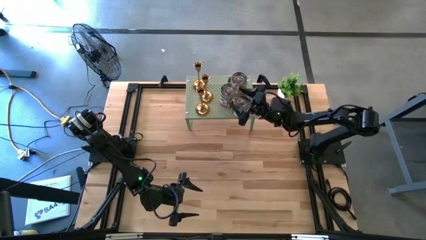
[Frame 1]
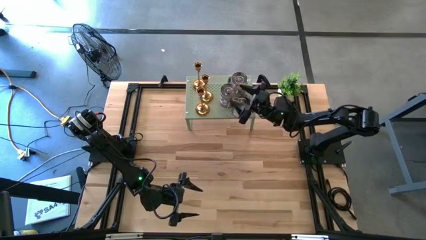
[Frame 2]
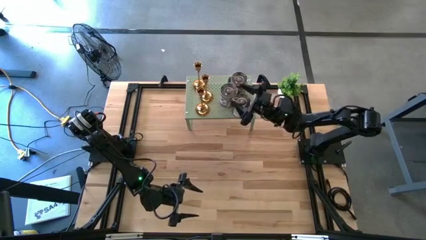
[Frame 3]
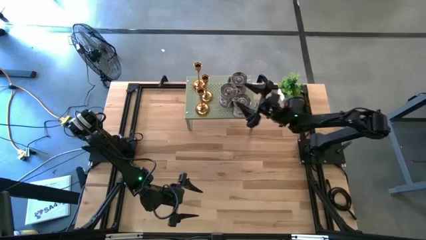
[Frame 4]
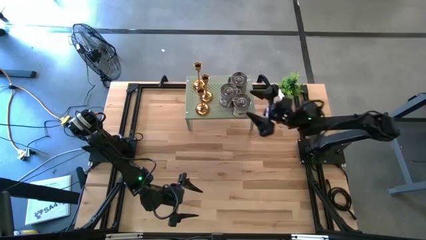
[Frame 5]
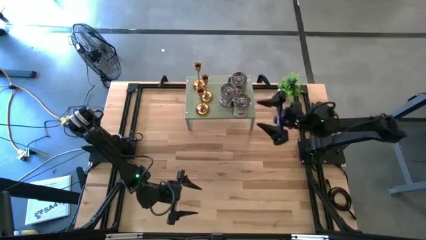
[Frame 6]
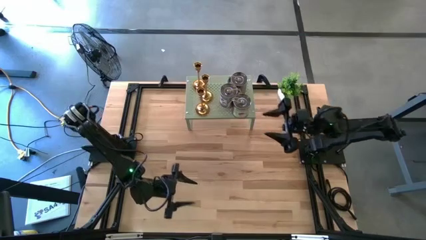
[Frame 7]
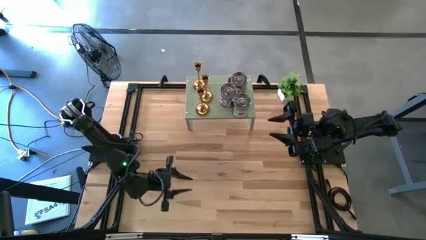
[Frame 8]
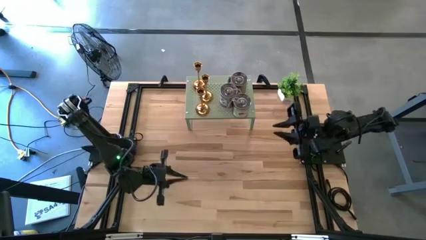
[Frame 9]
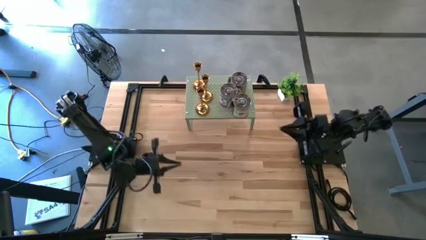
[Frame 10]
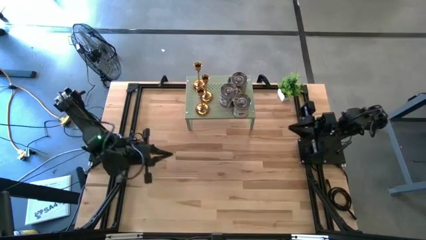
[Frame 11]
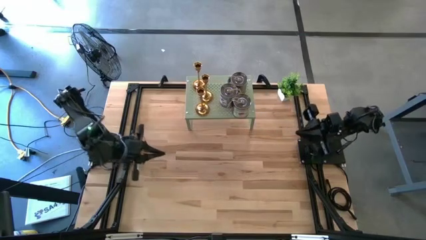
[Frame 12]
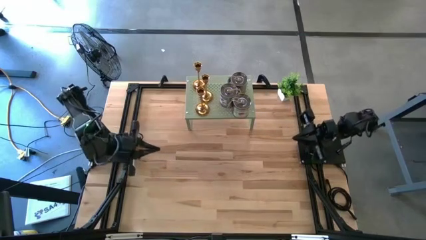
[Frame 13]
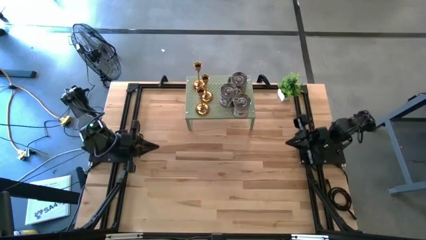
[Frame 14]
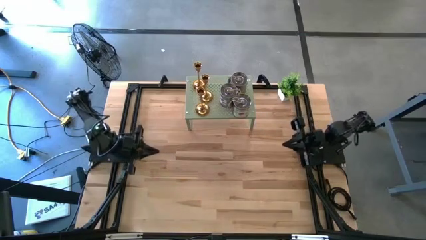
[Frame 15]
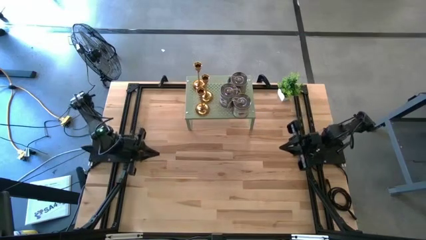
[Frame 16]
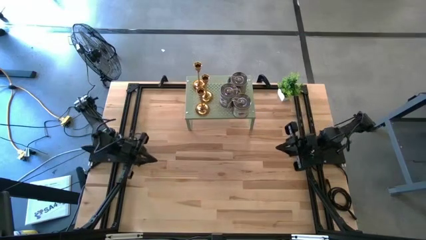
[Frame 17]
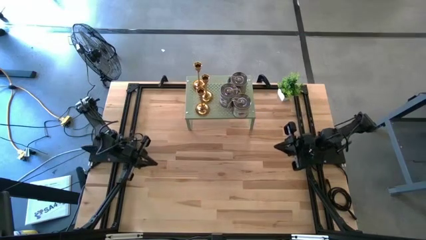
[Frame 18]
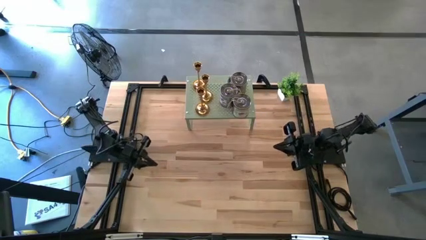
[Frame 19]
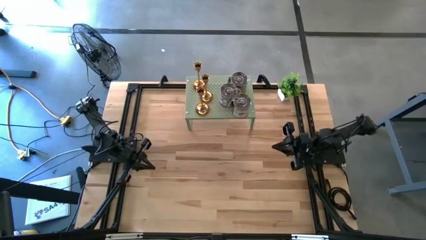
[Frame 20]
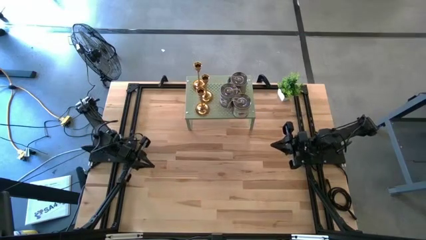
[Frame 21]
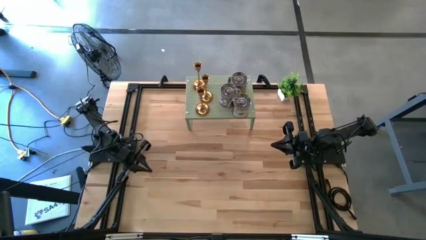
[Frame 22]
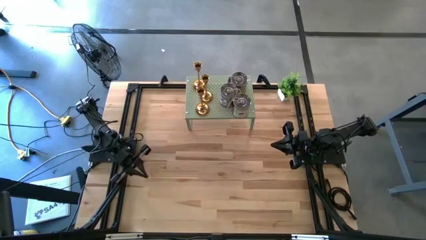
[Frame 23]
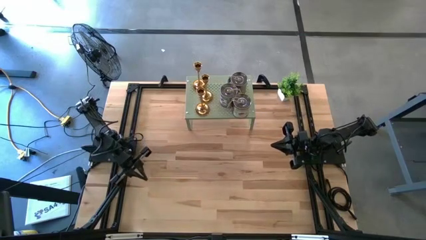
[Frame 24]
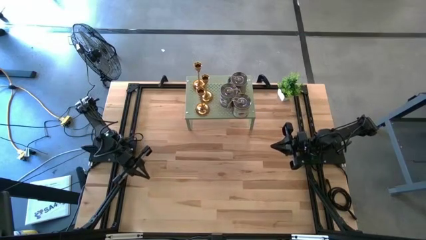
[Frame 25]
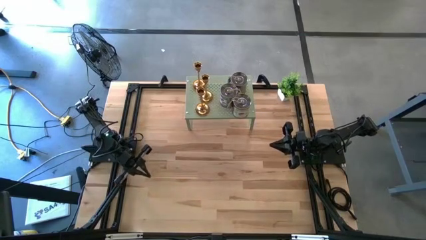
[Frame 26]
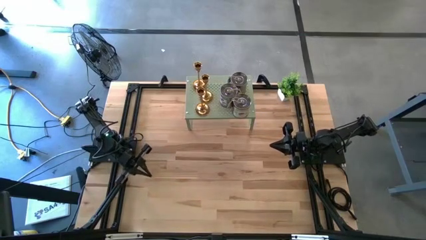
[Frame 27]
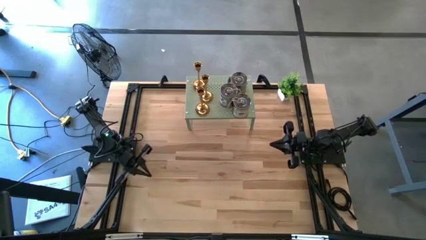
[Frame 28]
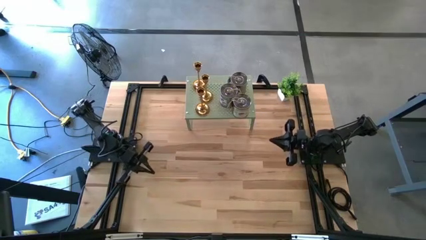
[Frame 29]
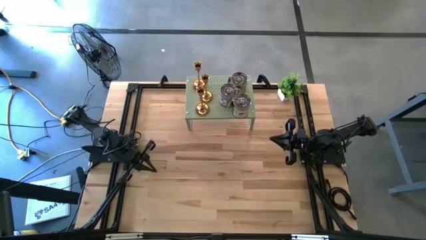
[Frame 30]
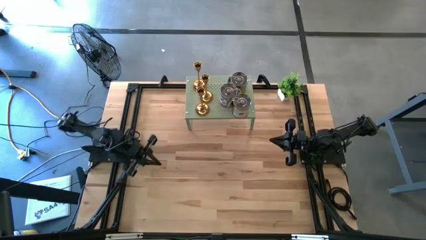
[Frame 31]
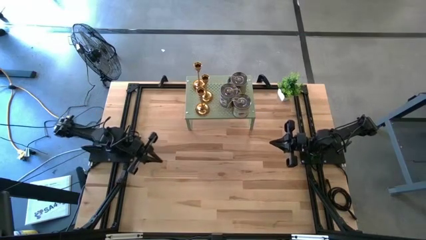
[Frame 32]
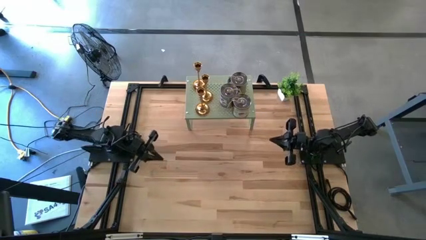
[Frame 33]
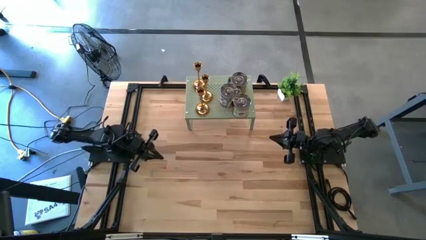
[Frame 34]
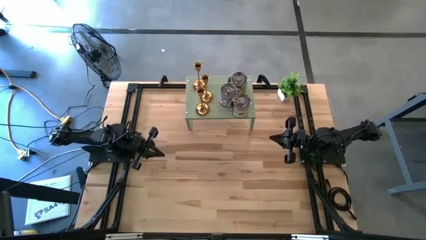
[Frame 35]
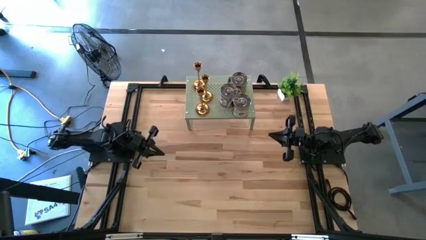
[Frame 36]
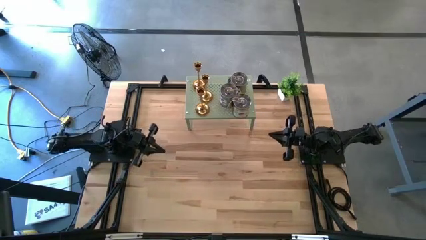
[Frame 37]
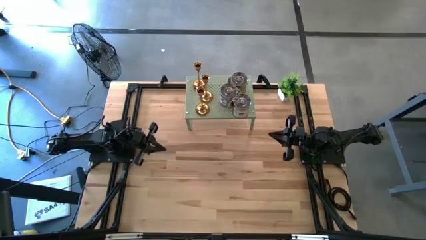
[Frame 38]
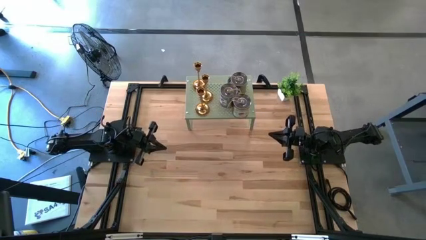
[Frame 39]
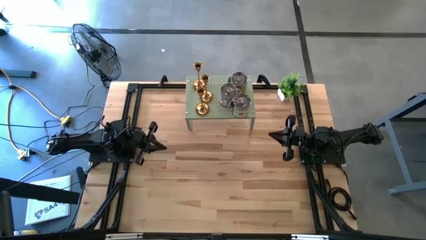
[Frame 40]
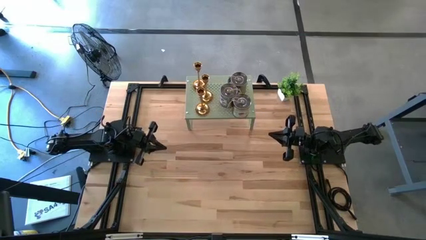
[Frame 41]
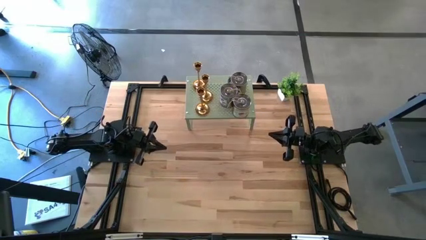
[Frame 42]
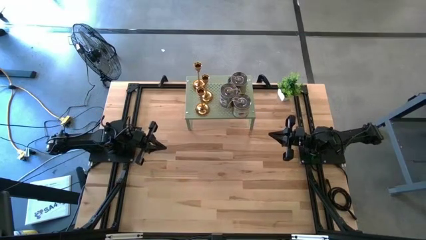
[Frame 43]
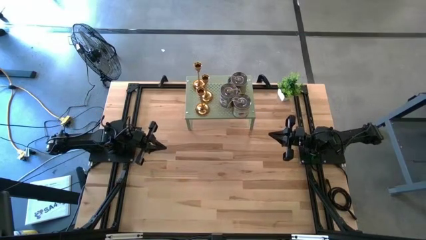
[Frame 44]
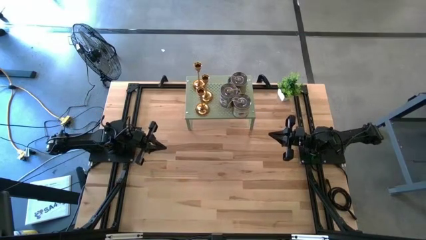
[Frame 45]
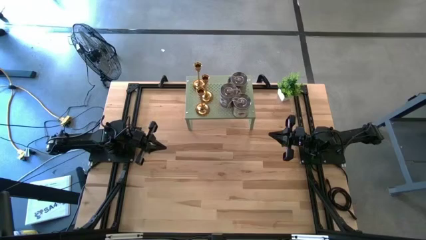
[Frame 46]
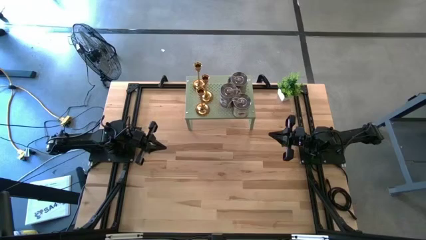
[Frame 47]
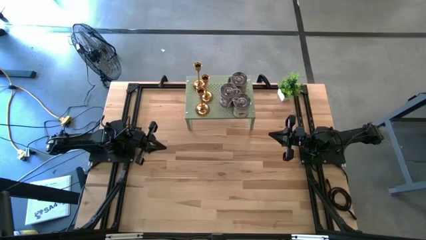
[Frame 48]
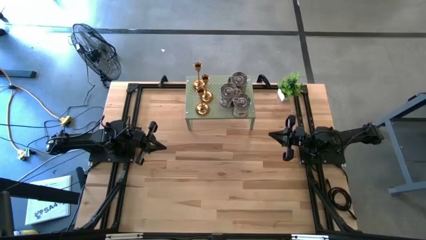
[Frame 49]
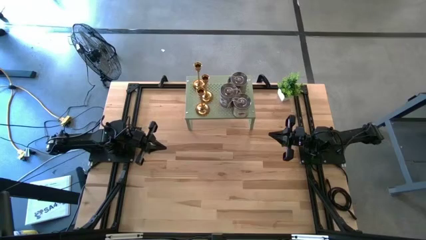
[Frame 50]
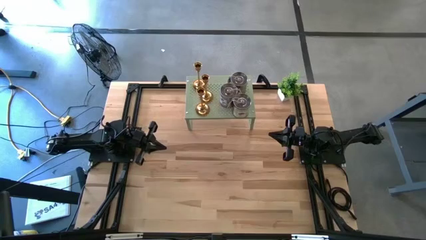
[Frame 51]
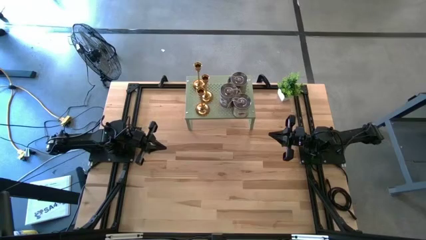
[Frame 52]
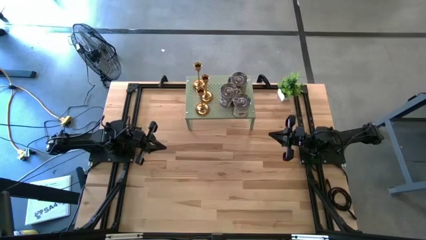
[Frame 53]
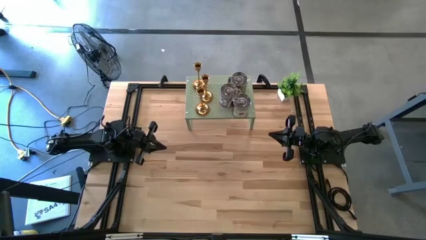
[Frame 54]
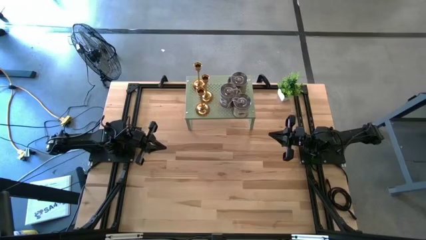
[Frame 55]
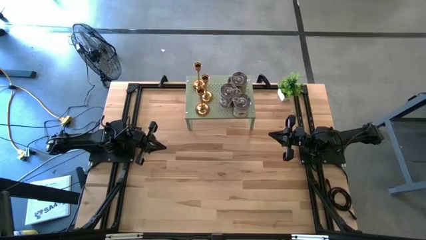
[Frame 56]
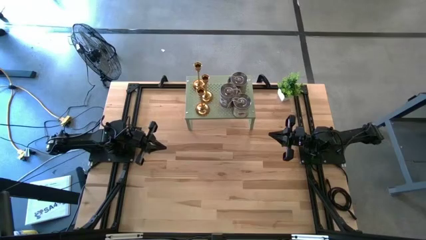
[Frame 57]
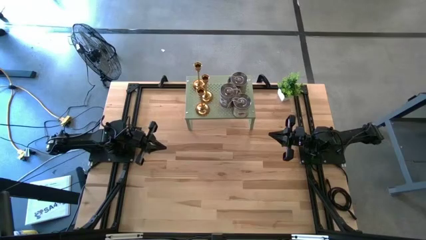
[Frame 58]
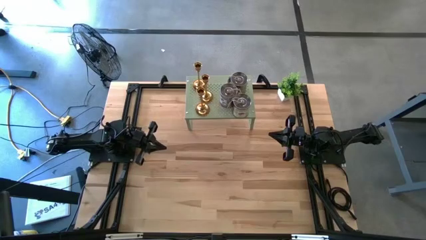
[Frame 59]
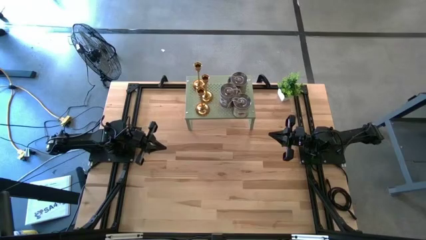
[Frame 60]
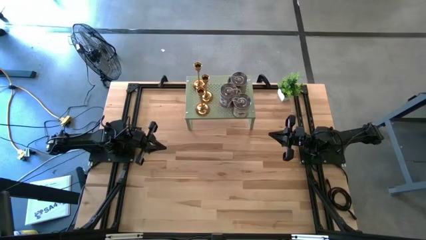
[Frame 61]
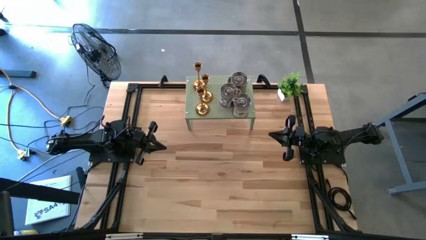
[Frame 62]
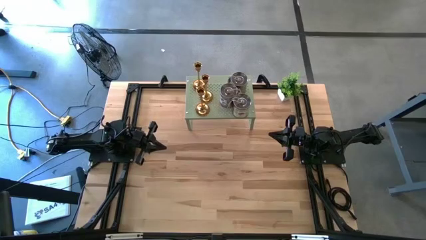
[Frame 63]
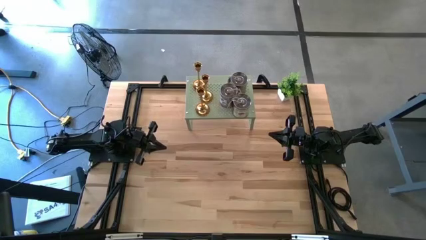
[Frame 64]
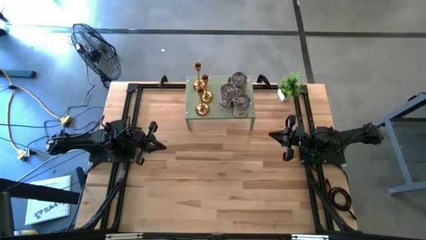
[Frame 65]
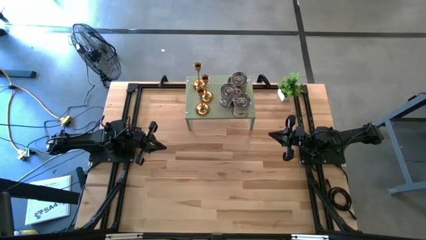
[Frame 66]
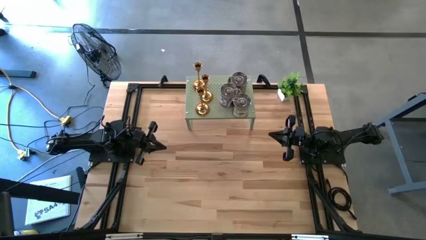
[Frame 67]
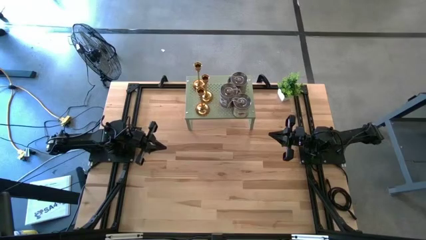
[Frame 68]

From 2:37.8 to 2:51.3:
Task: Pick & Place candle stick holders
Return to Home Position

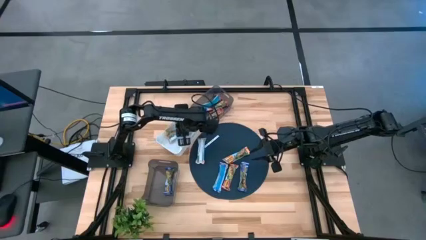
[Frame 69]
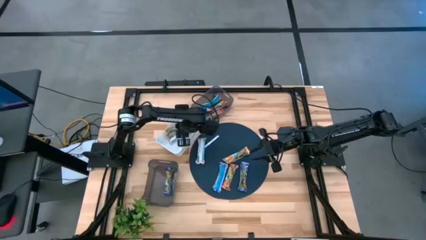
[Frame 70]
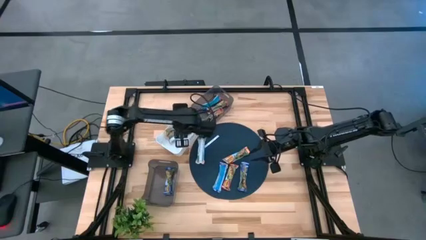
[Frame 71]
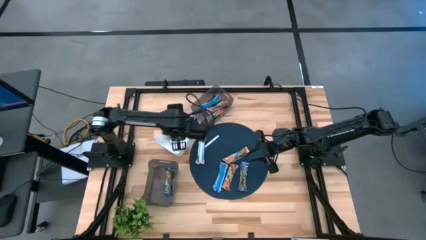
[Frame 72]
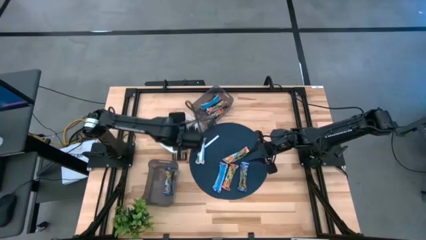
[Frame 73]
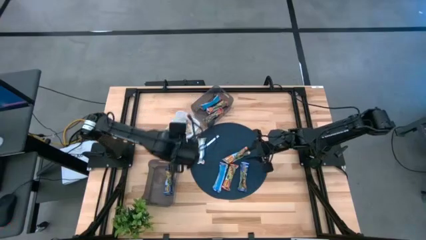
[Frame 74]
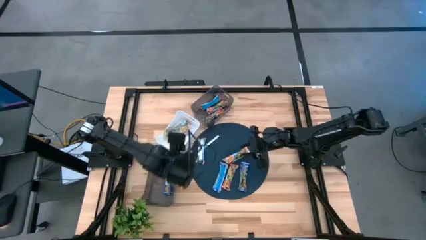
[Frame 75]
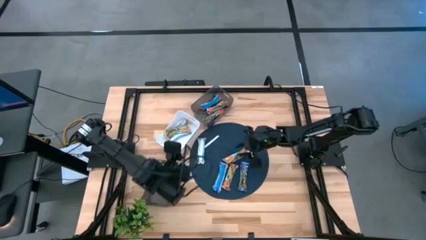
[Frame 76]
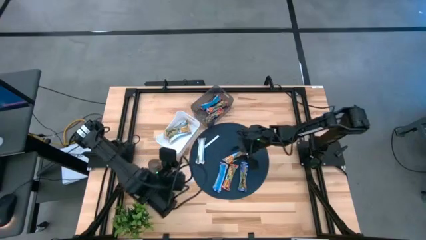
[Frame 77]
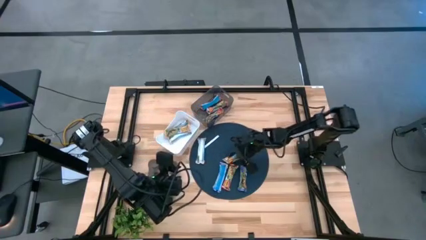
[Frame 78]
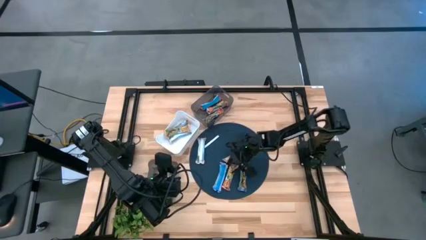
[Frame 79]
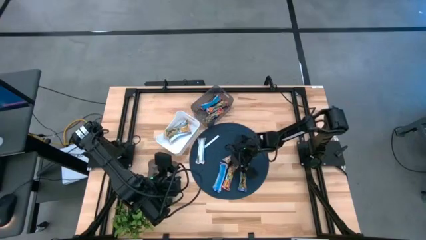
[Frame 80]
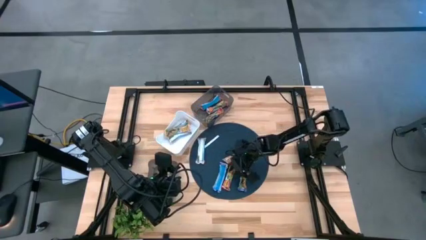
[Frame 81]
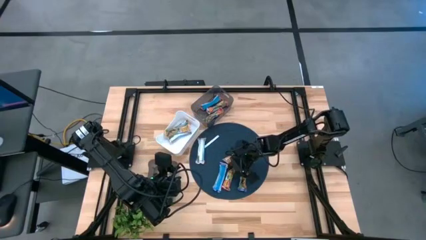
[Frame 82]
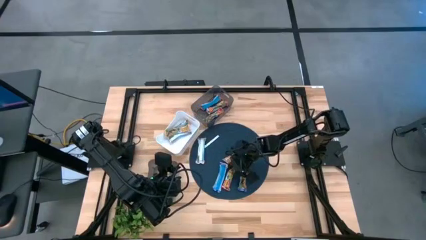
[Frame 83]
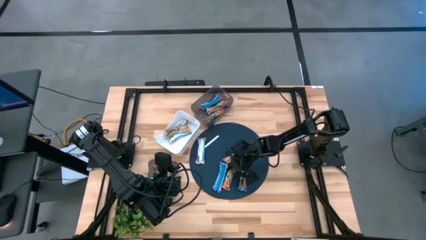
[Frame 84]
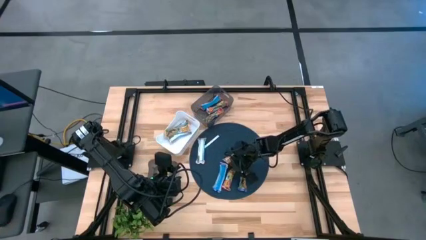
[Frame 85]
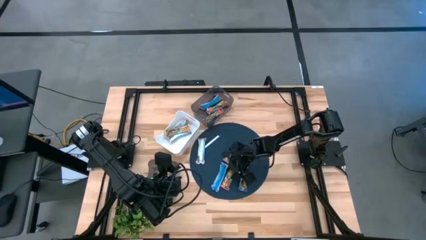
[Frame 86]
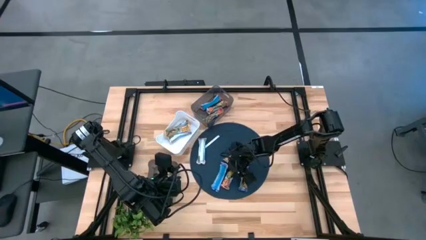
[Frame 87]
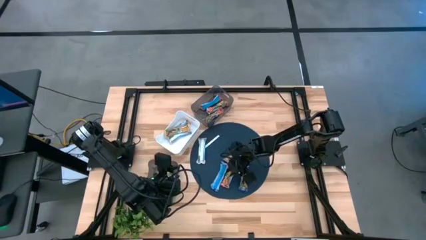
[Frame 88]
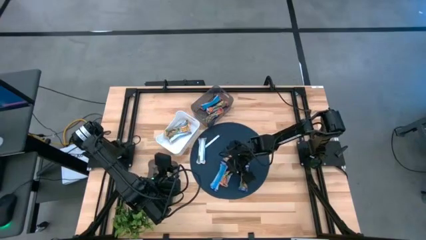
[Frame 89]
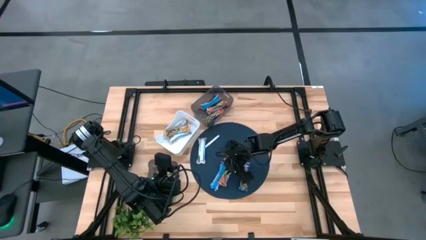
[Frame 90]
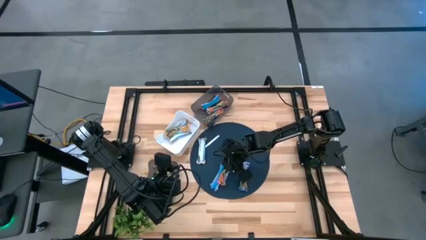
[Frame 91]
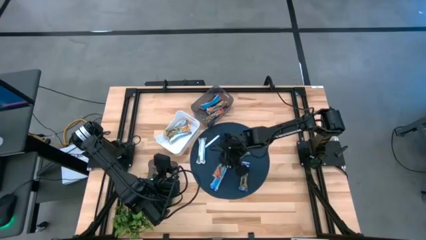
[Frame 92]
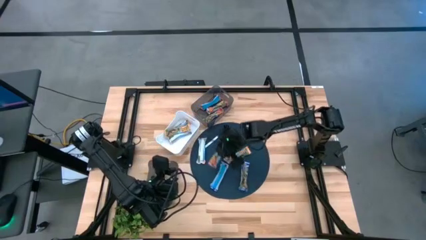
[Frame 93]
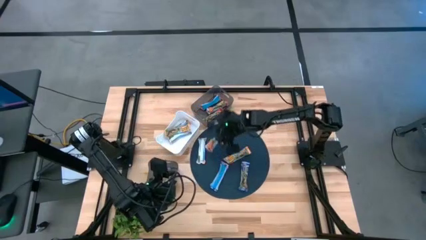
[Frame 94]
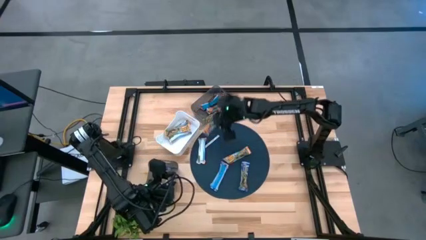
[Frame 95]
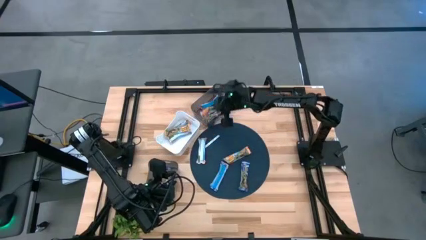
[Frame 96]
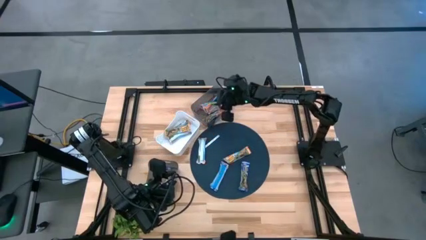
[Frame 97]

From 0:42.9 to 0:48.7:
Task: Pick and place Granola Bars by type
Put the red granola bar into the top black bin
